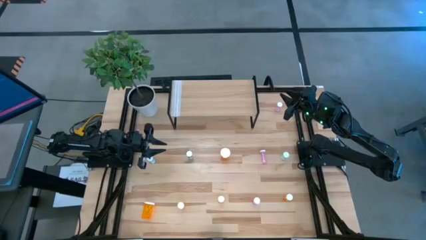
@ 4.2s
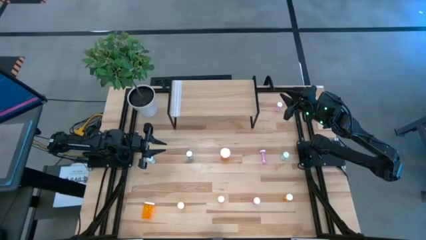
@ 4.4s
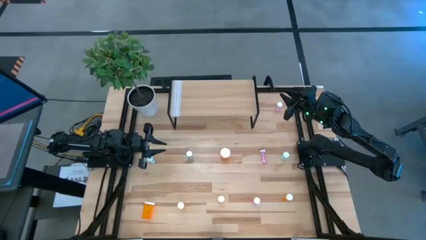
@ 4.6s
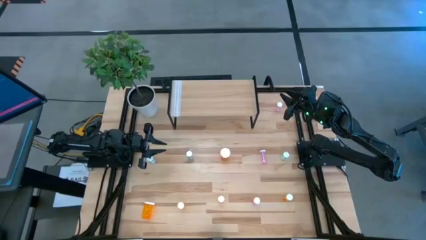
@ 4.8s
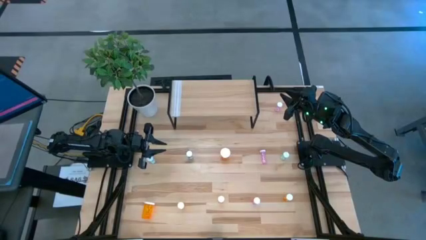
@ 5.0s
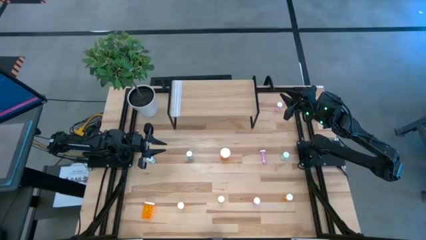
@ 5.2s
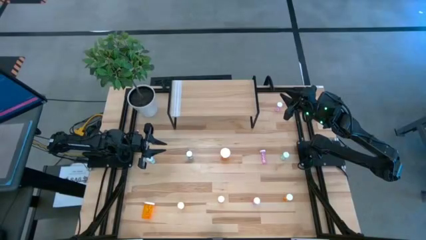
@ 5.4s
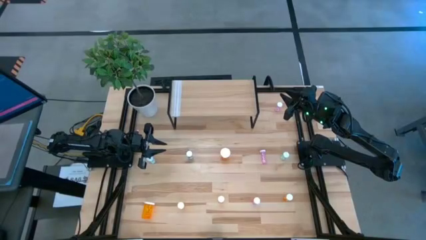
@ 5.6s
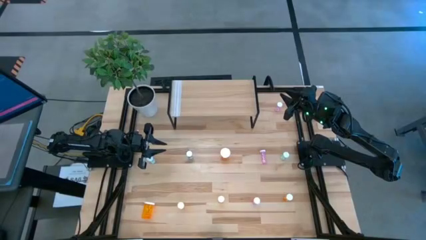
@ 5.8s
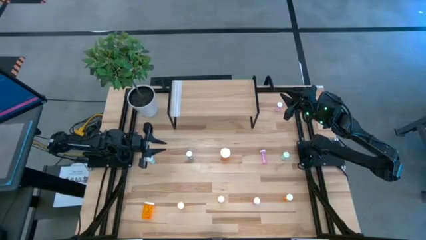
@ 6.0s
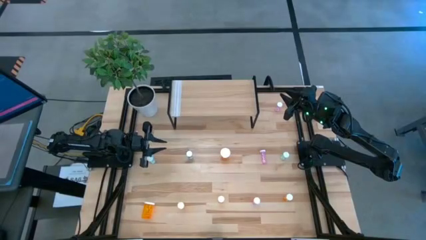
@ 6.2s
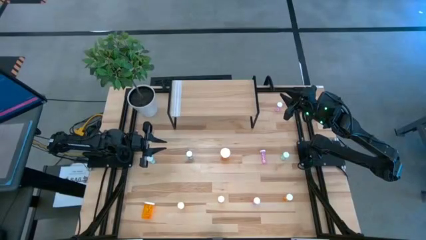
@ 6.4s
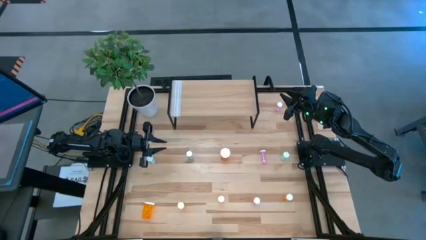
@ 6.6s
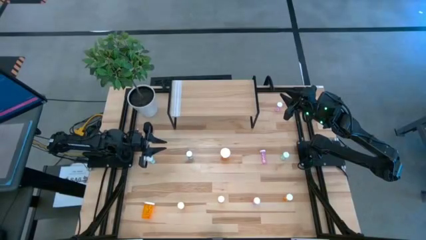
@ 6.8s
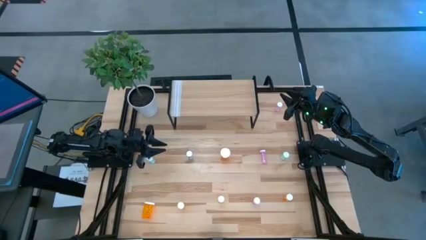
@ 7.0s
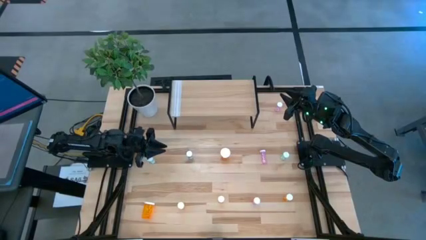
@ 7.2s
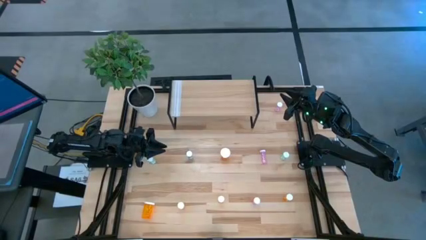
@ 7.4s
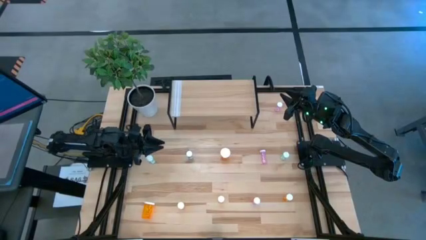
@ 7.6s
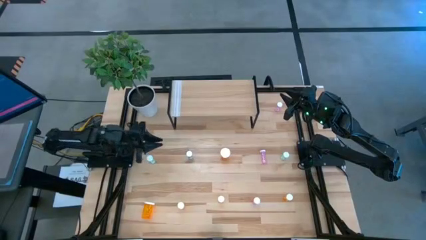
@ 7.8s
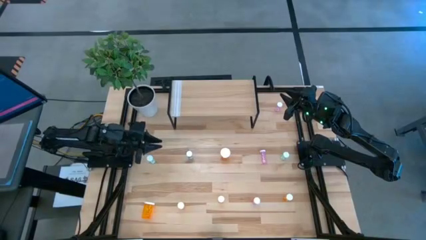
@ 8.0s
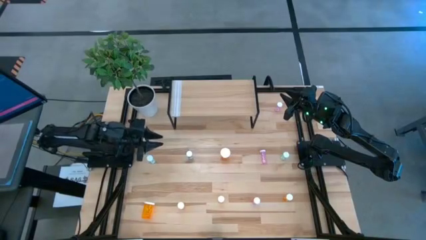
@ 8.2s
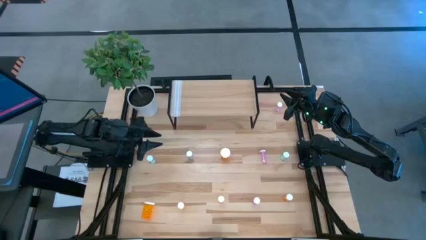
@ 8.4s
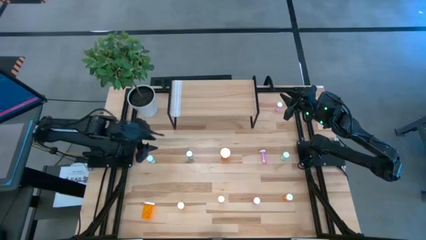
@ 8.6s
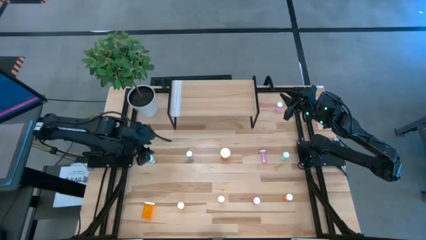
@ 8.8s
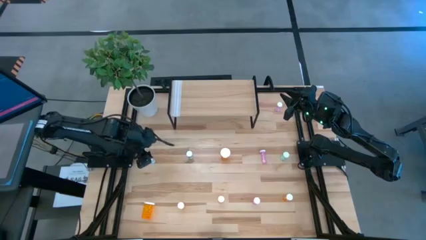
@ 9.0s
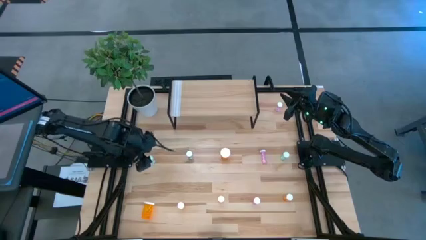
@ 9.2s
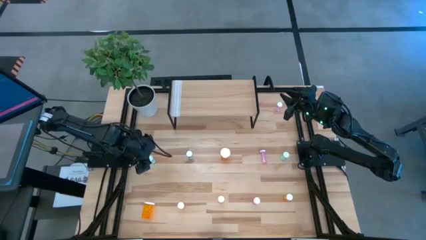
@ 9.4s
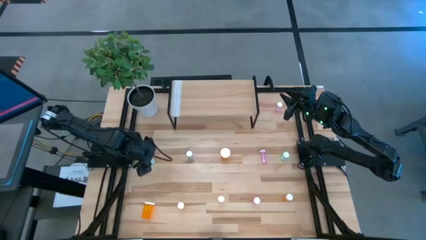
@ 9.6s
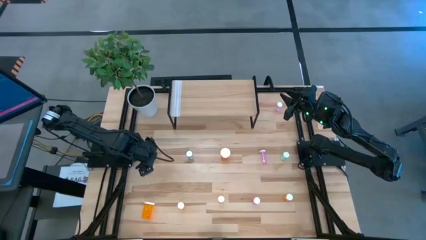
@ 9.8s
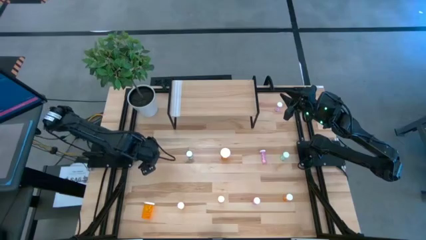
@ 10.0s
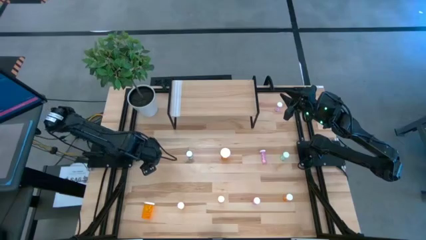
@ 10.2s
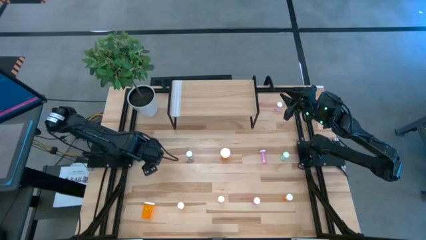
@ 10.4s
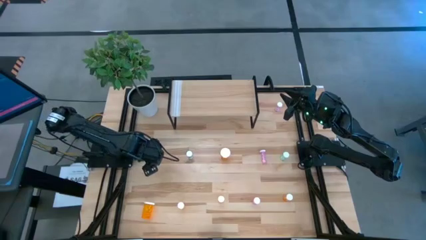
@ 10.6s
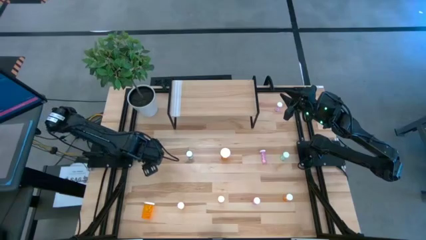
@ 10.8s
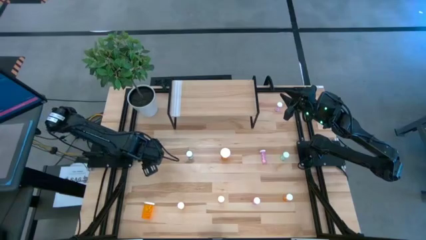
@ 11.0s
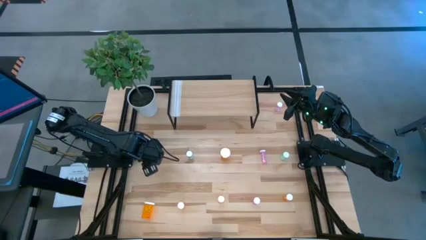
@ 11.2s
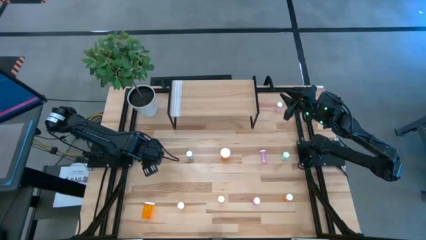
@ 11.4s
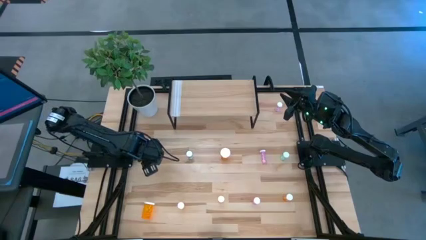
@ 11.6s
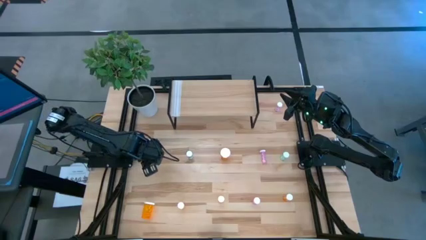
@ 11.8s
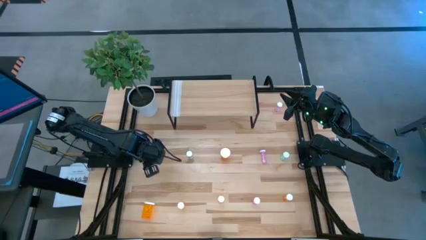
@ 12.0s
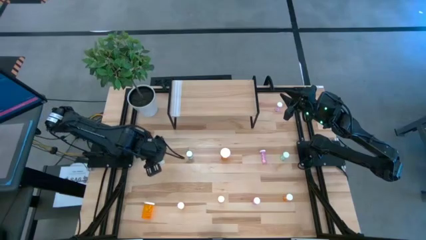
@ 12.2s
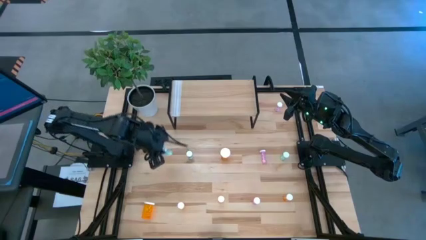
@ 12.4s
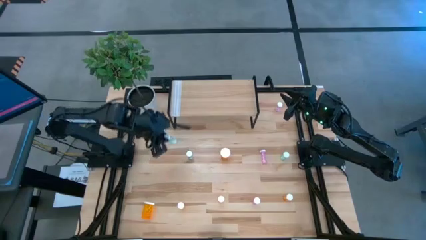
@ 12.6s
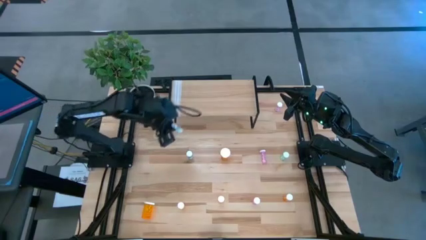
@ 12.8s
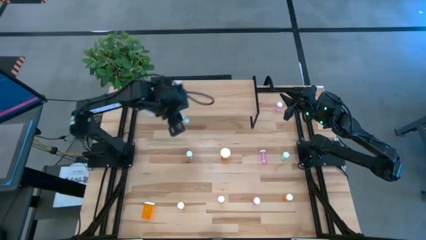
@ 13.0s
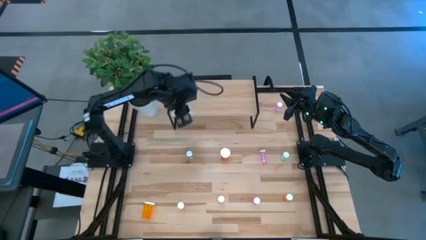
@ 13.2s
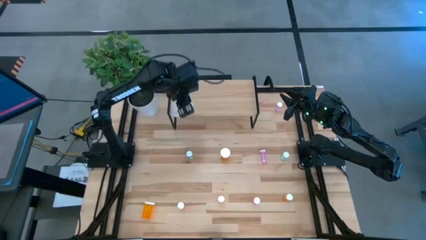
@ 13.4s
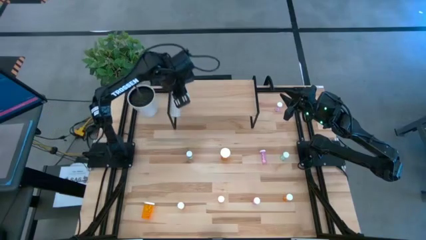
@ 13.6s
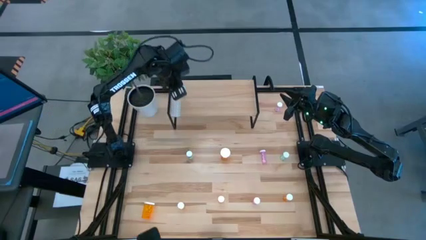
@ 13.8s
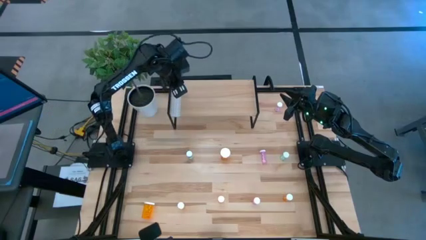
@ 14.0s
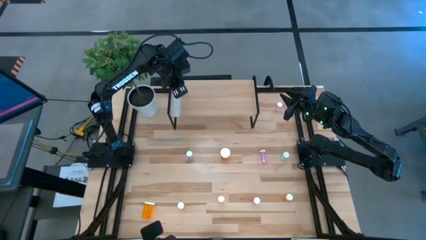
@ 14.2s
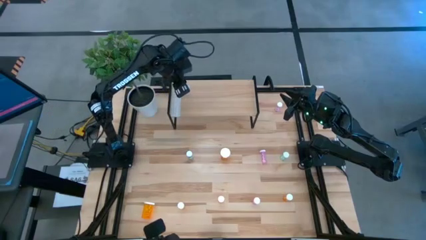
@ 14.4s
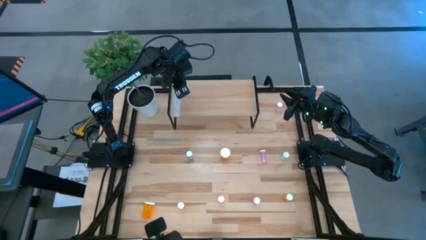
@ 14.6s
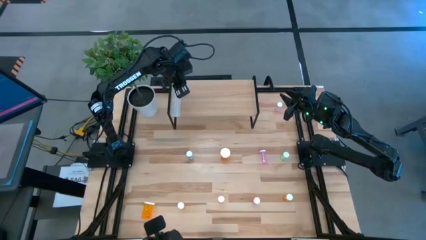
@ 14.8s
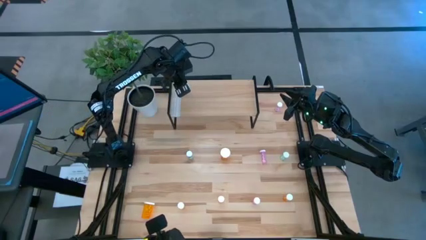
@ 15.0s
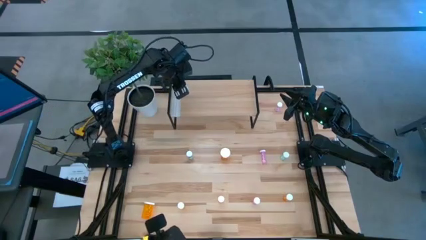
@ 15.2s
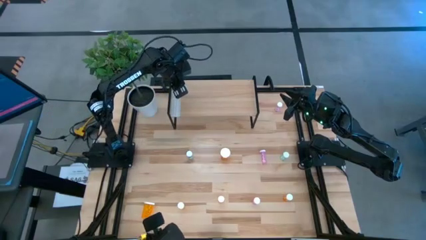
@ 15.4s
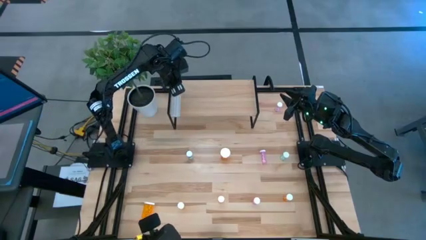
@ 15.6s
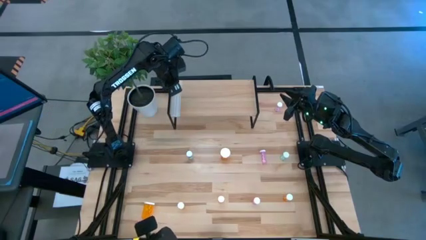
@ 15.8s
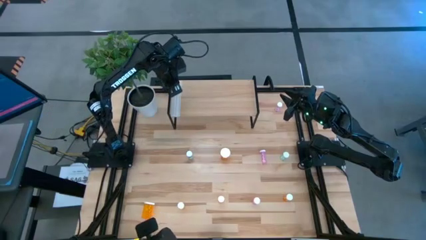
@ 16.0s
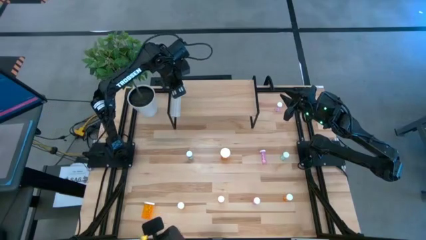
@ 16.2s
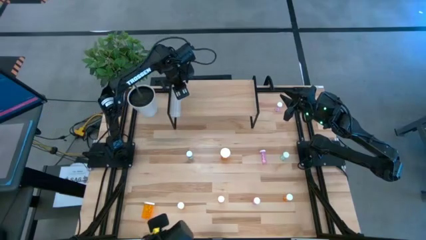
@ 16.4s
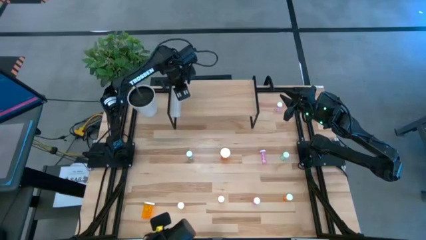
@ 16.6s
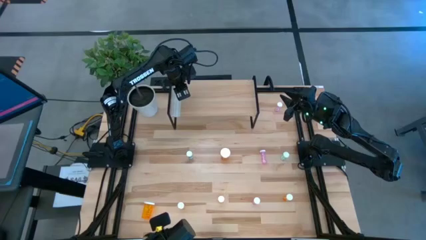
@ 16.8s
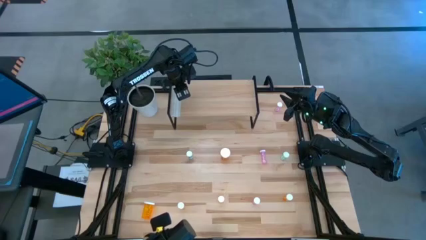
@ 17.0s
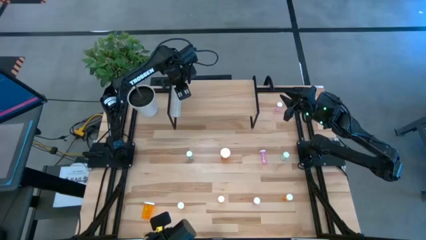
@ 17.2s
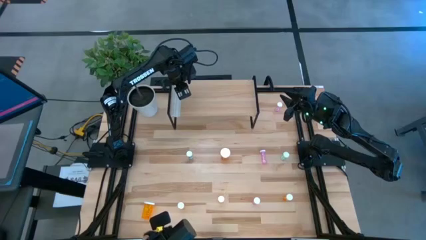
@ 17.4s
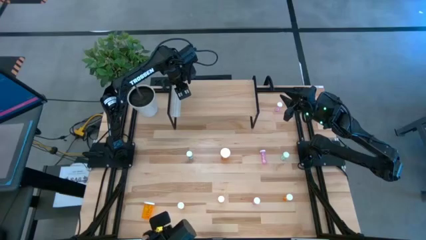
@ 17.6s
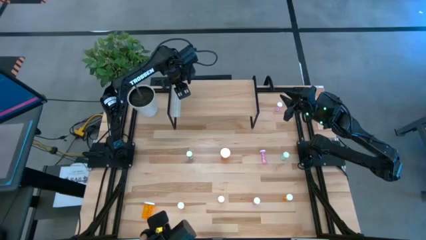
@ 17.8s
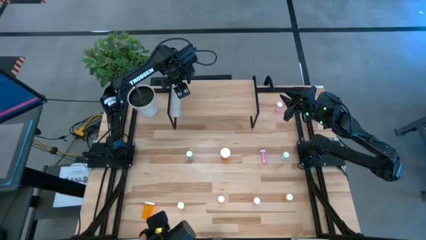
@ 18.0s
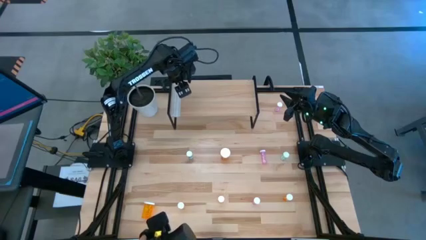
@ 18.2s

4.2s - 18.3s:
Task: Pick and place medicine bottles onto shelf by color
Put the left blue pill bottle on the shelf
